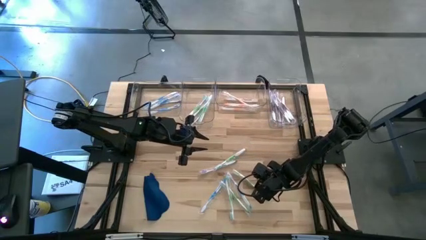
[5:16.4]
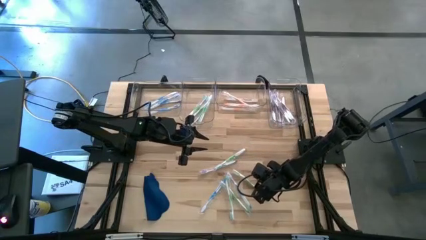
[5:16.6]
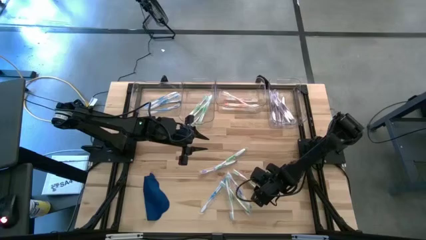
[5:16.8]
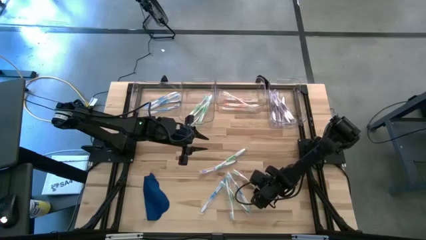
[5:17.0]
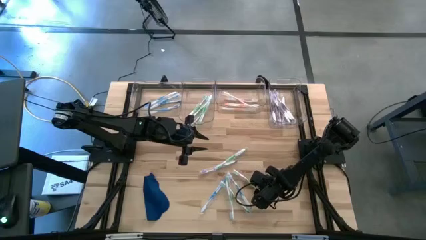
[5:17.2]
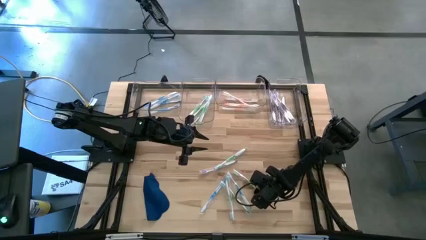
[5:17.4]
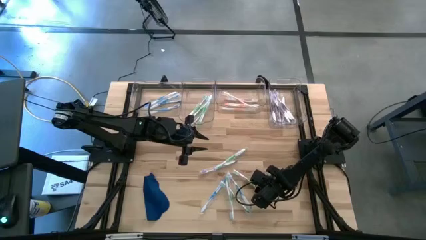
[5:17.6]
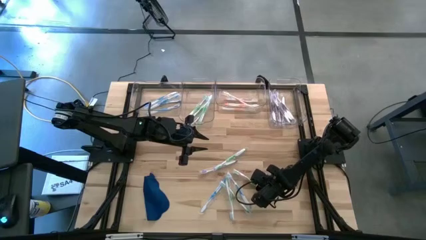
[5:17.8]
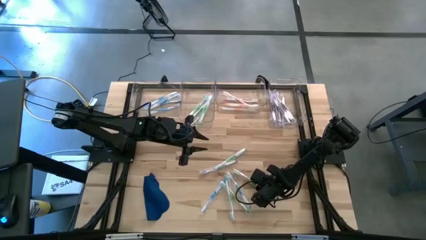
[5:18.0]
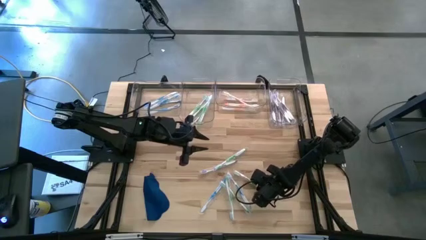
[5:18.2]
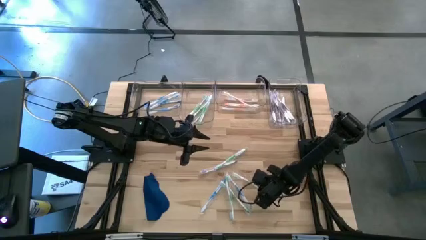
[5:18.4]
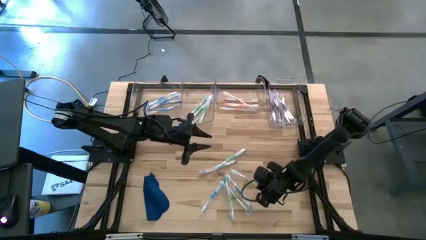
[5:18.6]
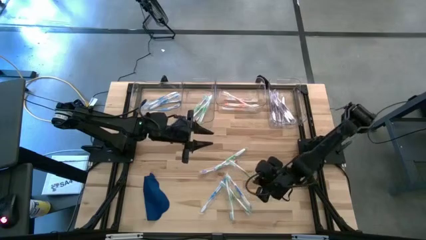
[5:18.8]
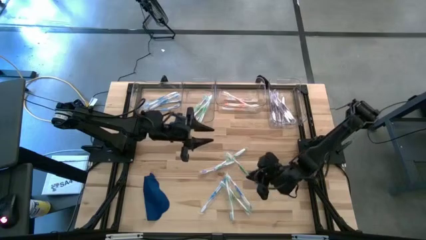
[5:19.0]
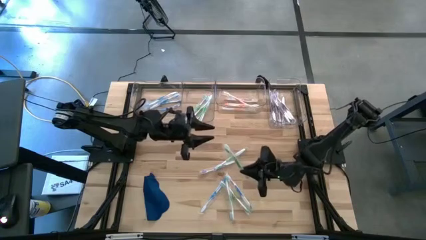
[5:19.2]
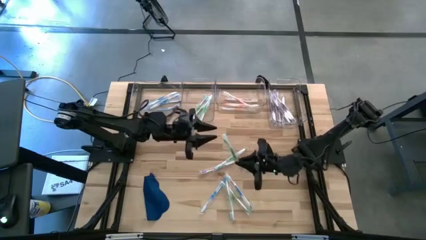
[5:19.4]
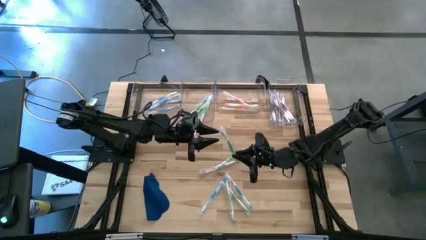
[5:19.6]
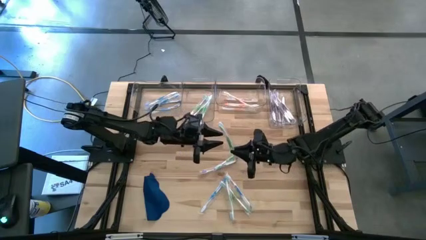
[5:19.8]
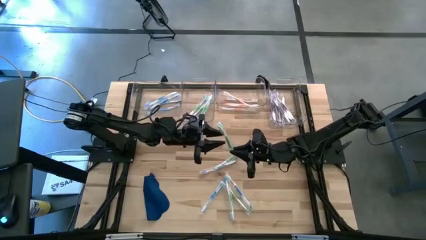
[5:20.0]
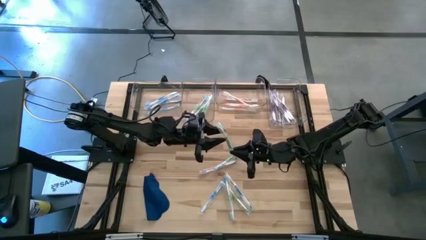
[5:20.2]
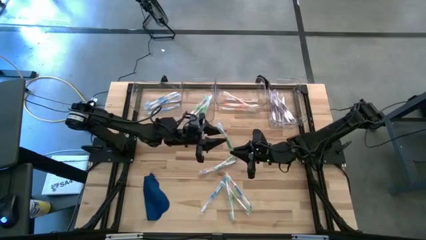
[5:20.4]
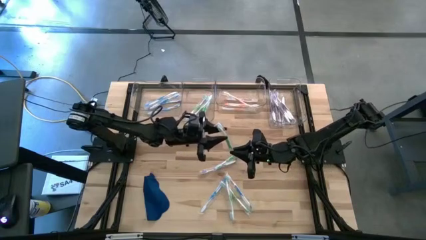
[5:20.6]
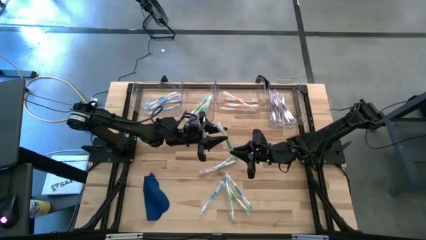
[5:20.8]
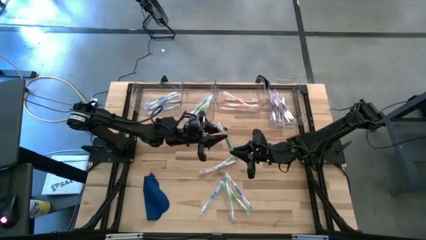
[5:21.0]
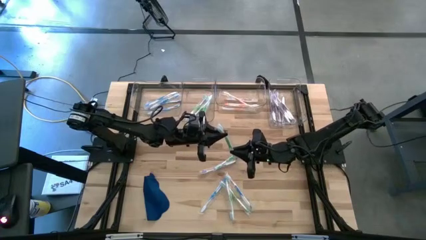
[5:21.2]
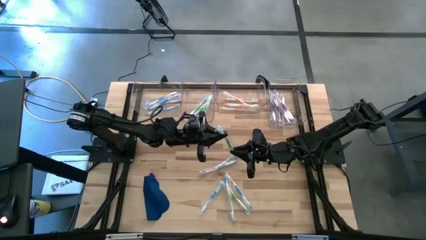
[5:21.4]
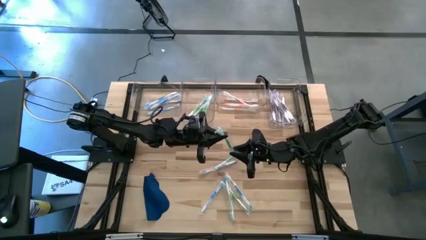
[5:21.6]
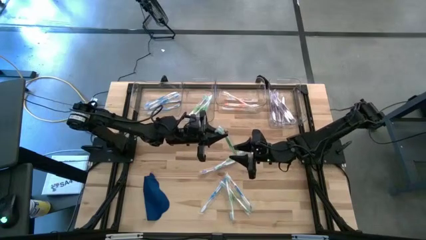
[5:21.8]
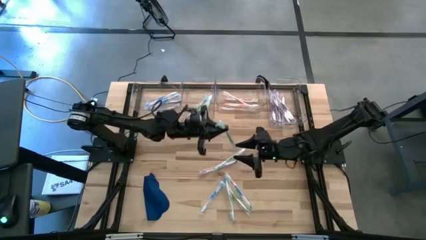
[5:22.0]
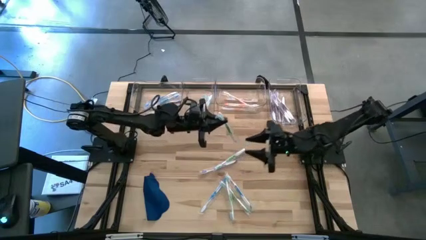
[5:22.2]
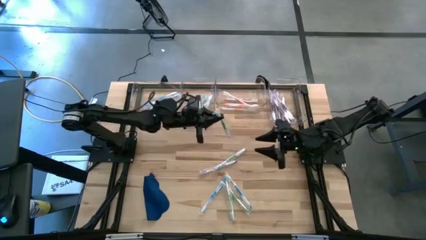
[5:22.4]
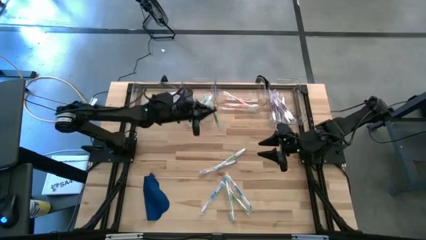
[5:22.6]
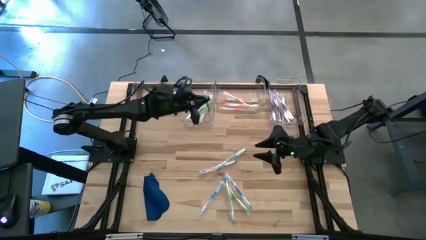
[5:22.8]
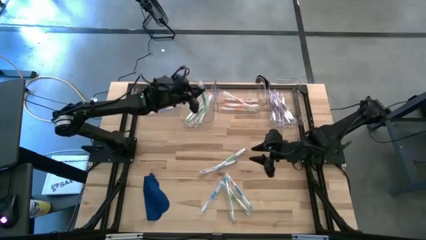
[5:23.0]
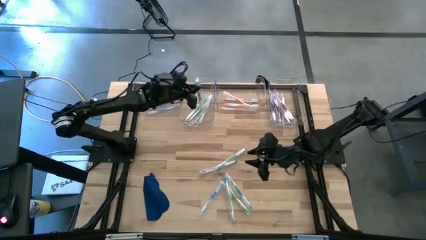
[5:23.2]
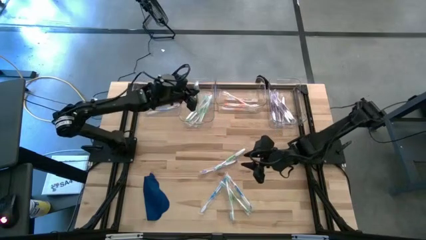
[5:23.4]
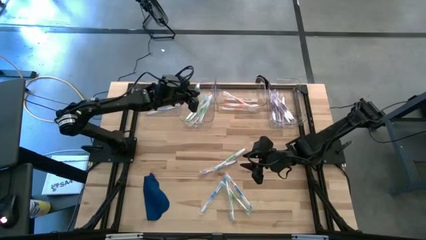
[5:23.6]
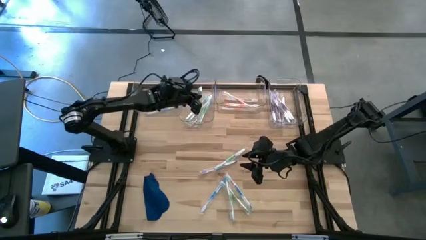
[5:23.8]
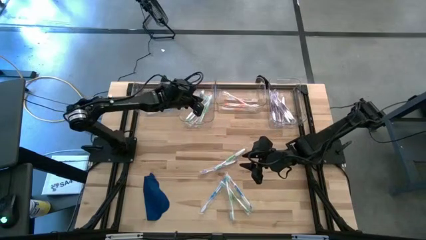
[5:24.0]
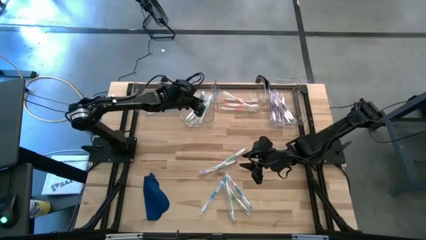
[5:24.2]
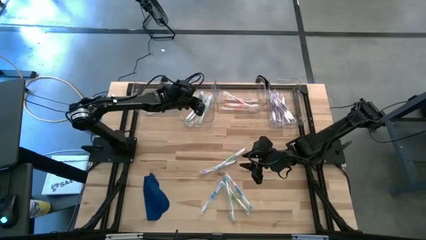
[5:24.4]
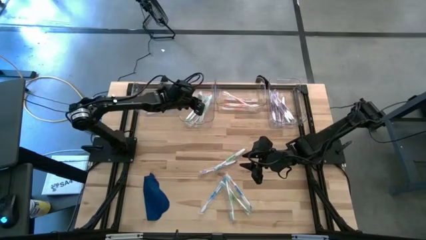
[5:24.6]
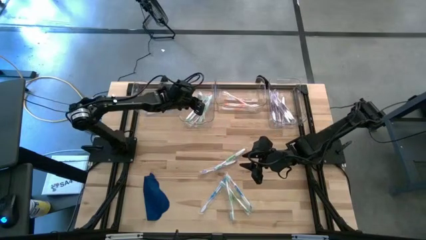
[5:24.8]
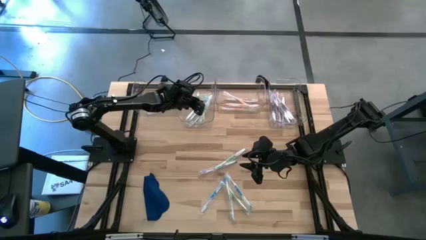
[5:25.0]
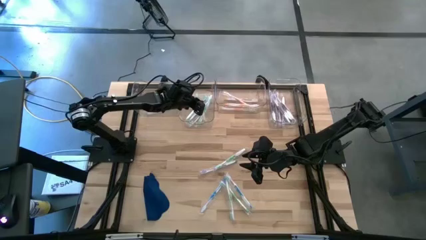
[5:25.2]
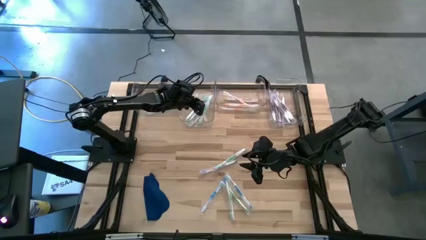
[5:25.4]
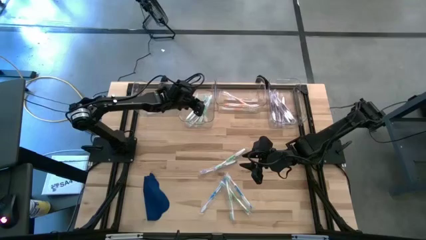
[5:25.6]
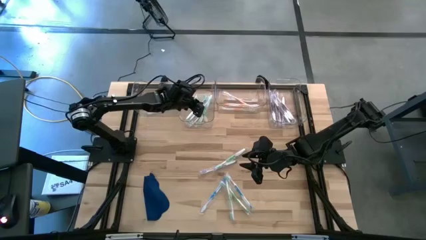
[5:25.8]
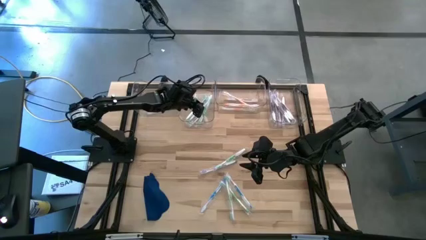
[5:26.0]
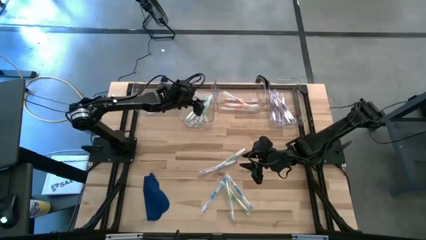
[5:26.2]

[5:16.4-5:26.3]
Task: Pick & Place Toothbrushes
Put the green toothbrush into the middle left transparent bin

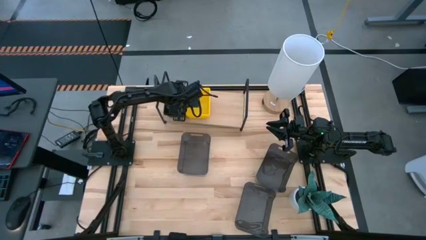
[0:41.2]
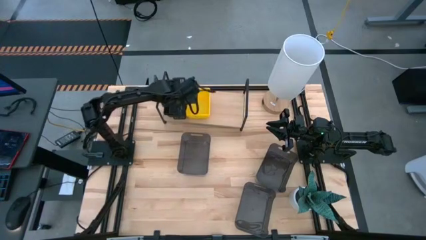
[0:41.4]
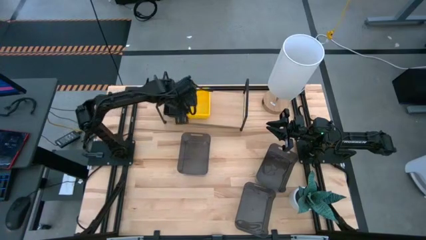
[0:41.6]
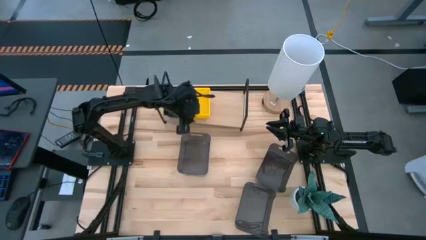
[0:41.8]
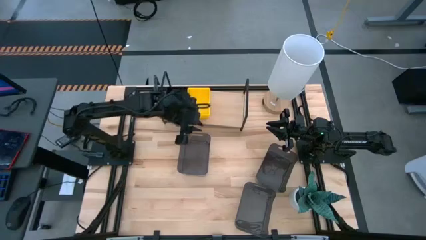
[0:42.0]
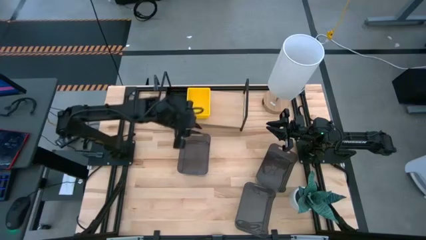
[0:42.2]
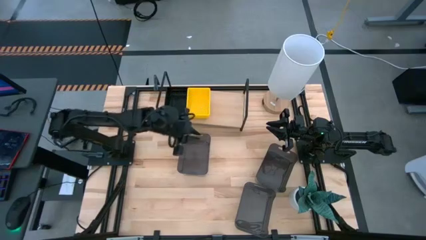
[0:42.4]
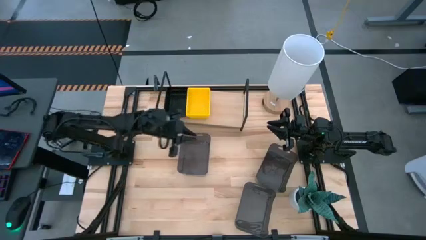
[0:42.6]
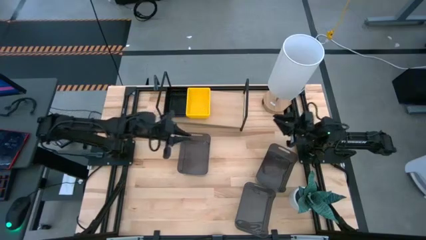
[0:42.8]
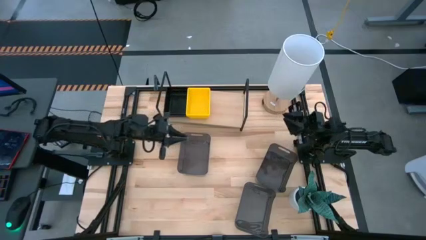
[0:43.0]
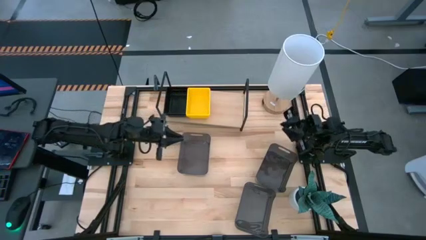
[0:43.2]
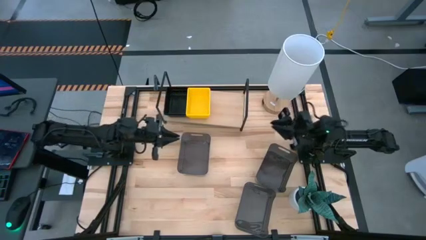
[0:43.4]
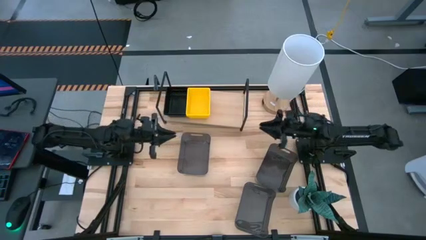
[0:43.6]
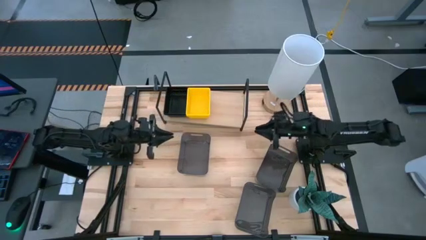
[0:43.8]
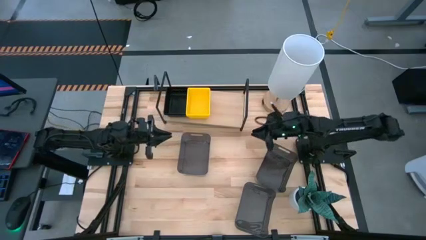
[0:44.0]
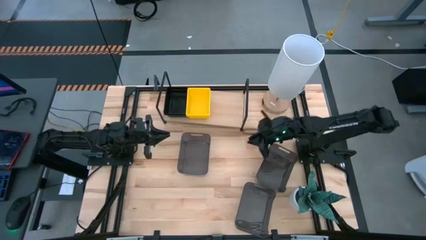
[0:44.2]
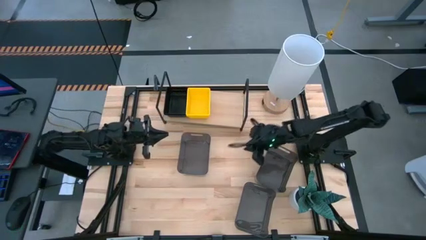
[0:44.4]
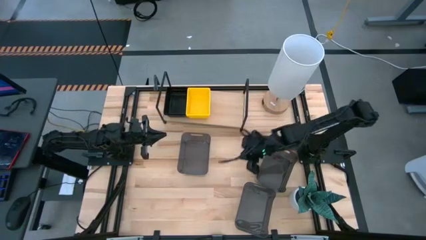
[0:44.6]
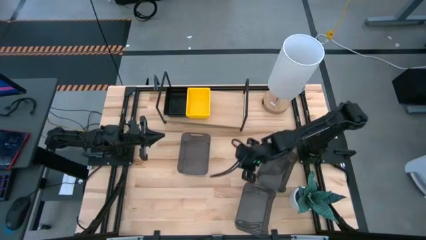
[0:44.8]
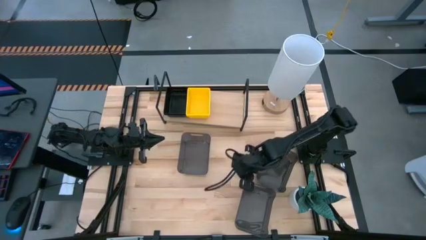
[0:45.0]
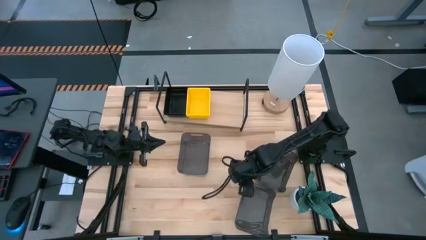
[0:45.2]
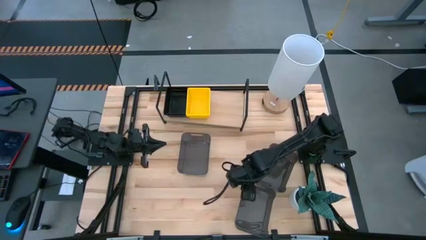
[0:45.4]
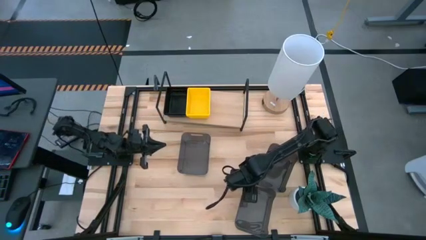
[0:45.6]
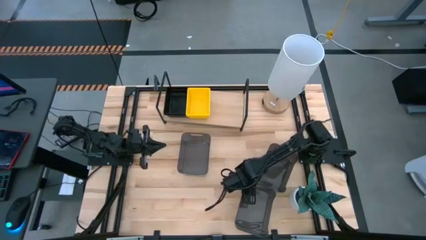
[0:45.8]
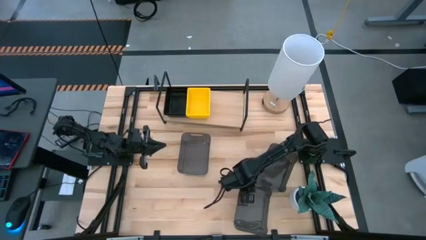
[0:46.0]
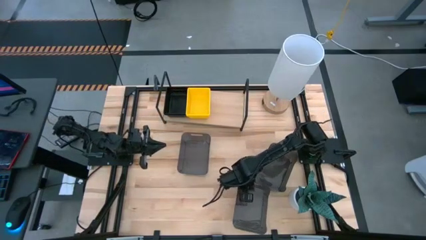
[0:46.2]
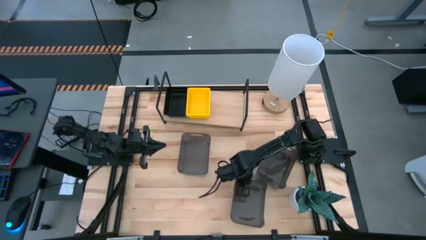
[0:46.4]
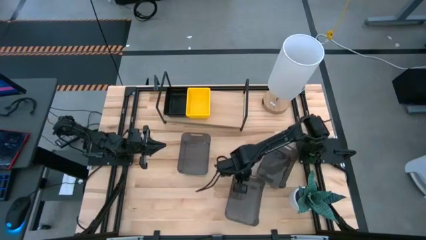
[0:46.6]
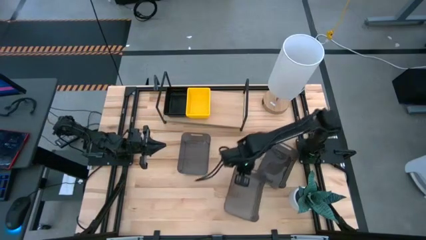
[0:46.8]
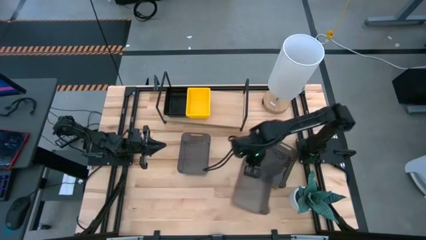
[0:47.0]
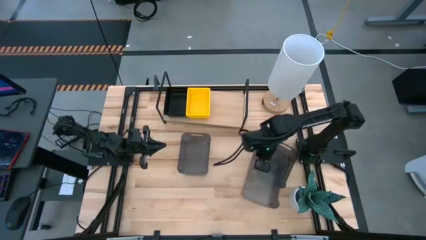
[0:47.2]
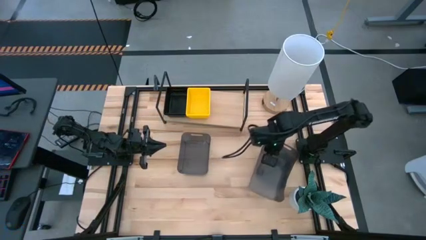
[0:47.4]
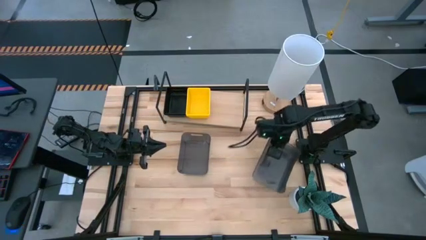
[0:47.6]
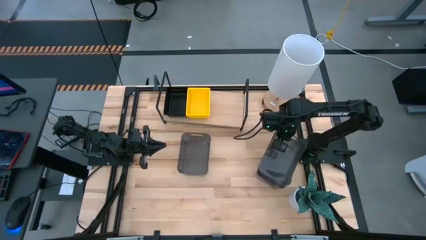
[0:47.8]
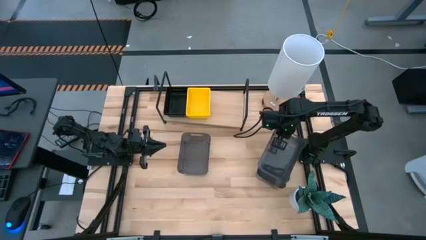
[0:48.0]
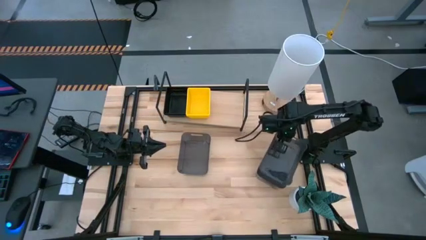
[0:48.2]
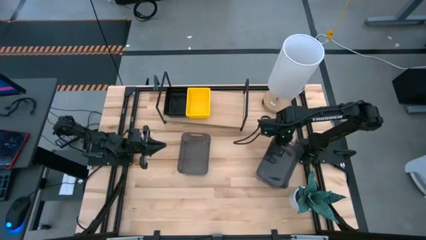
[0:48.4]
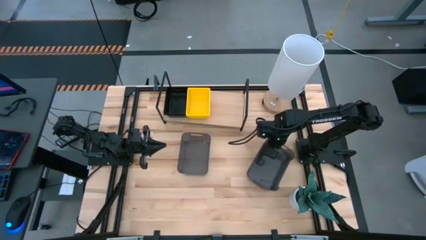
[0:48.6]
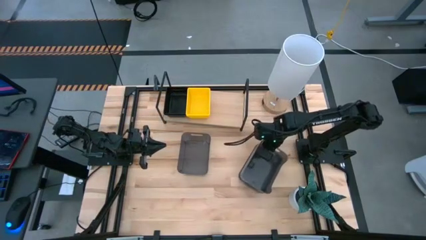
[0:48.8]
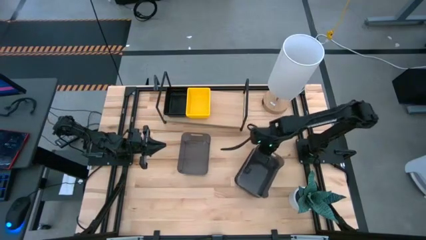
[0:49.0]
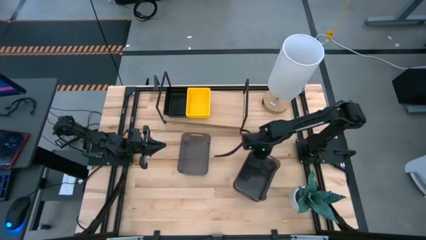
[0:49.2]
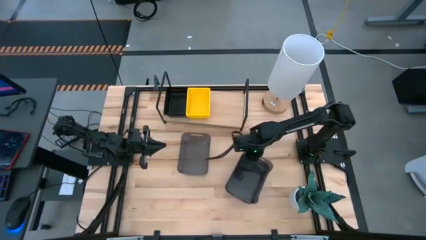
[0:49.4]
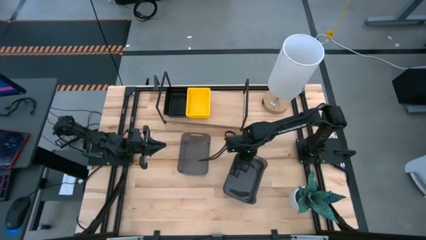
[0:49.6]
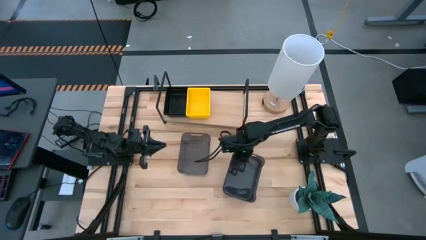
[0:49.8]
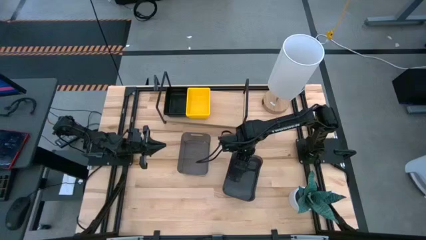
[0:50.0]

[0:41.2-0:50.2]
Task: Stack baskets on shelf by color
Stack the bottom right black bin on top of the top right black bin
